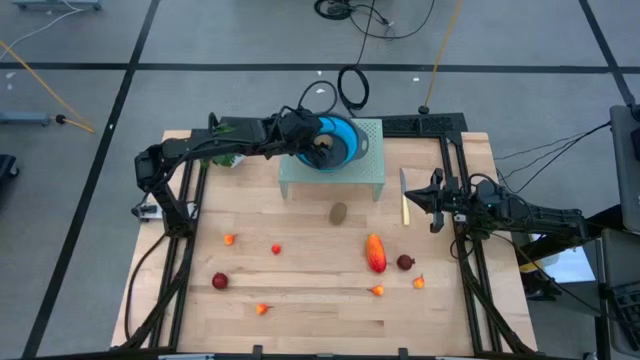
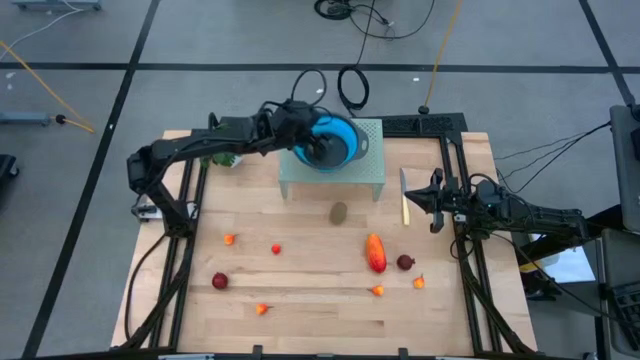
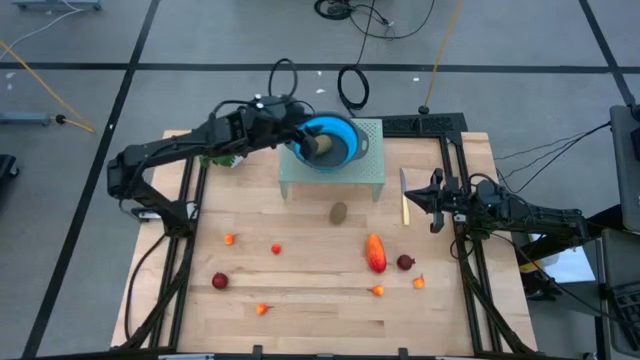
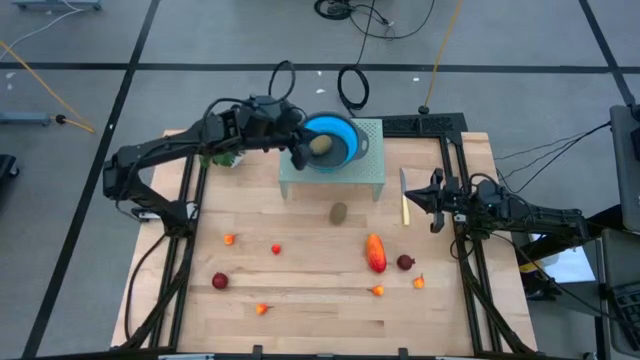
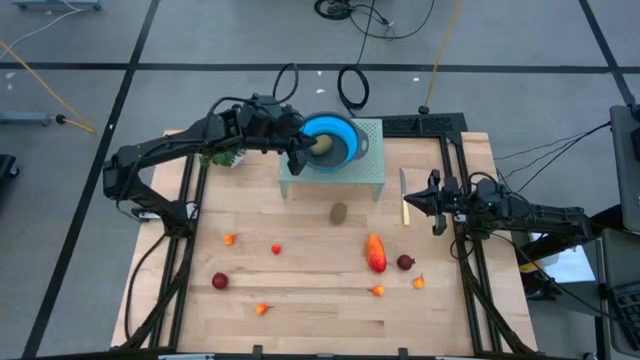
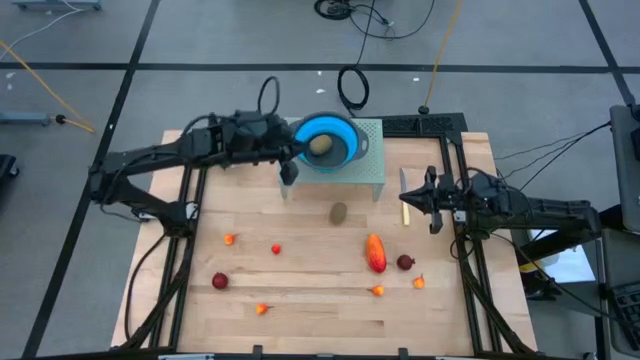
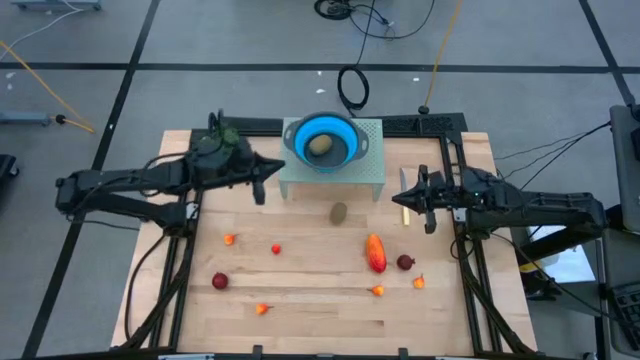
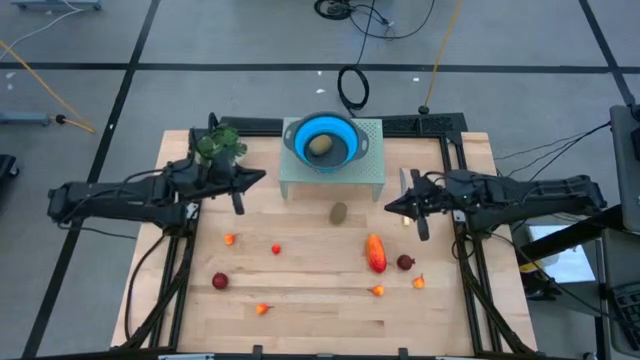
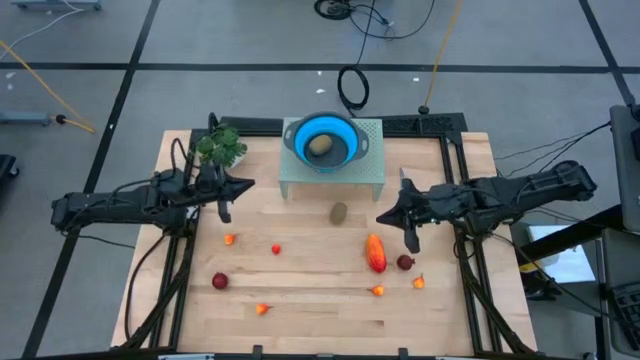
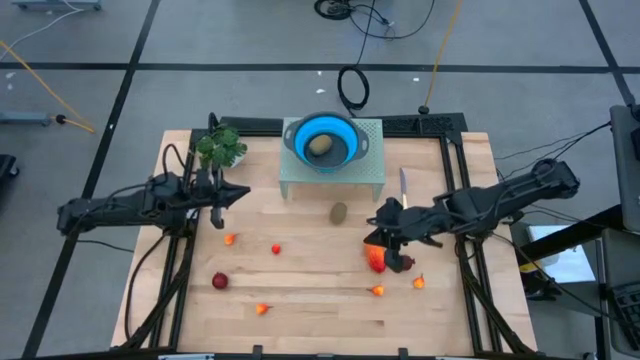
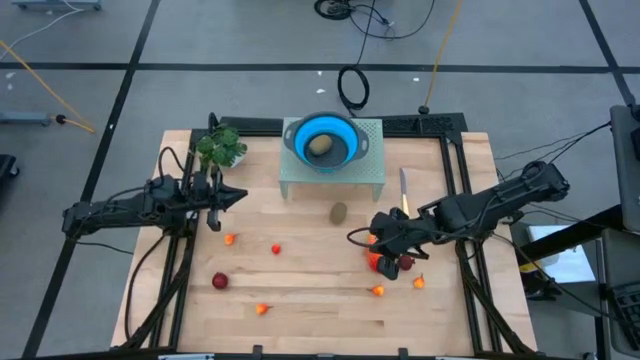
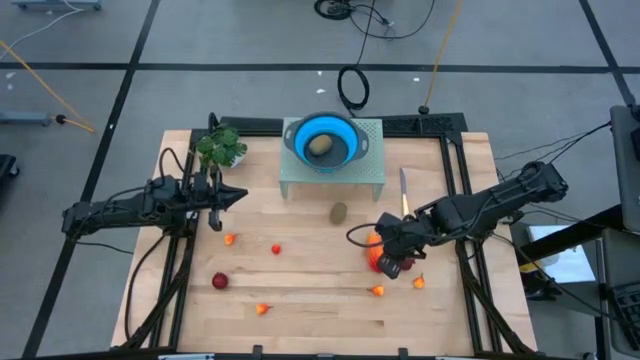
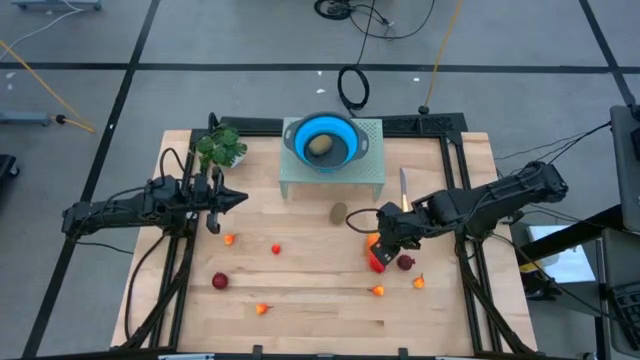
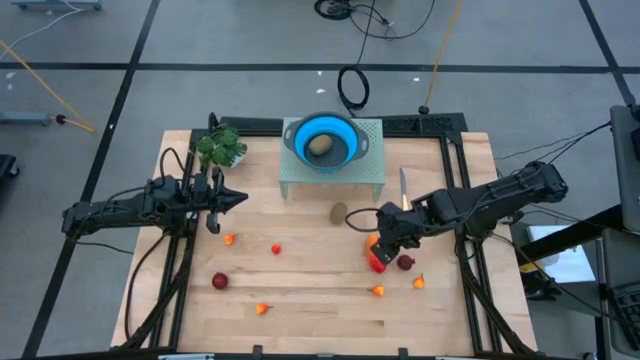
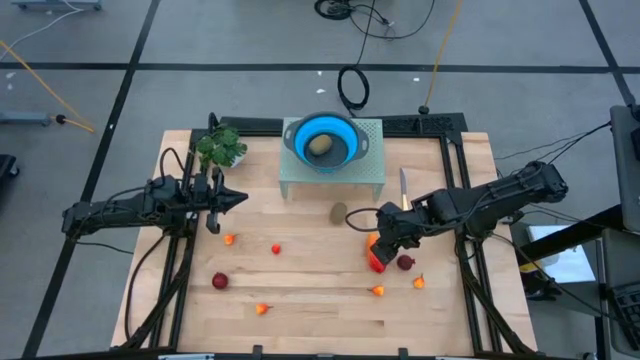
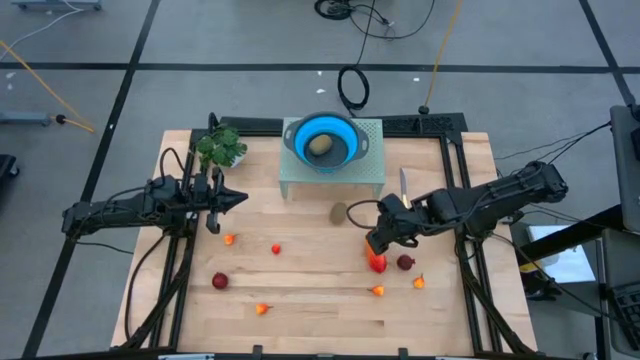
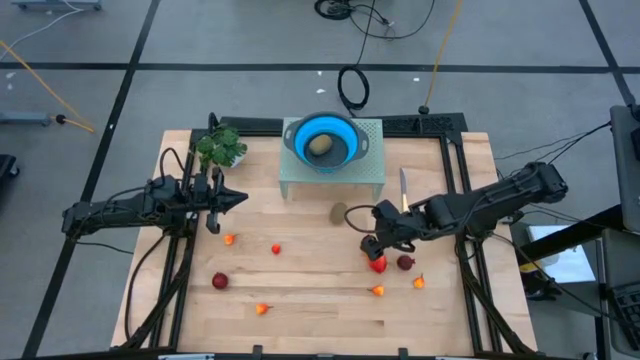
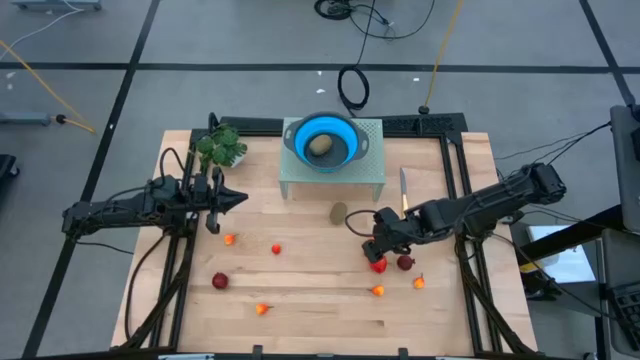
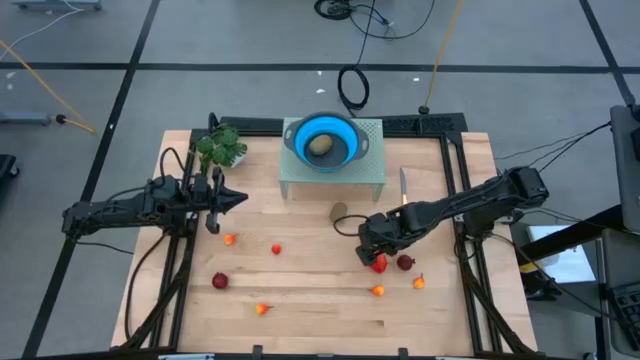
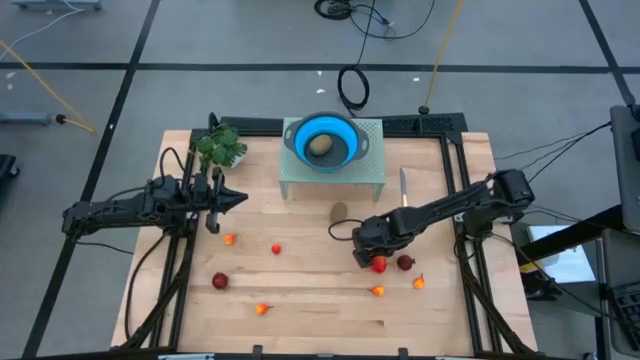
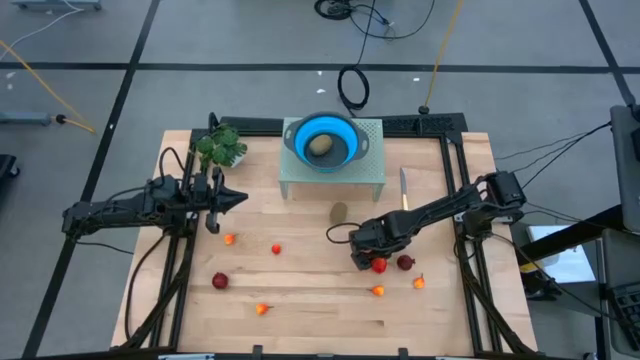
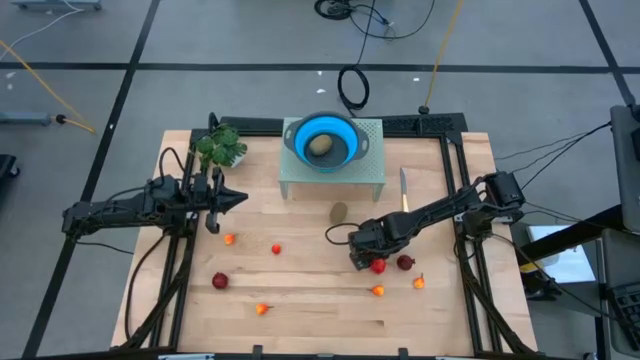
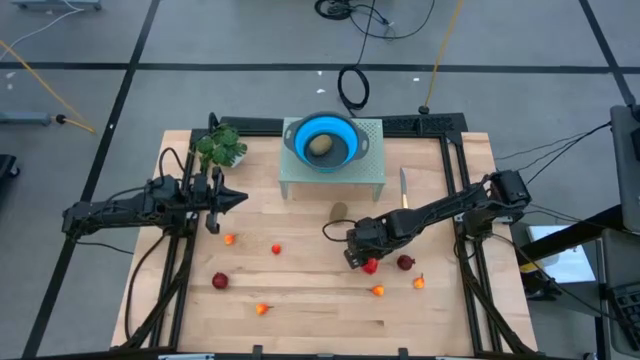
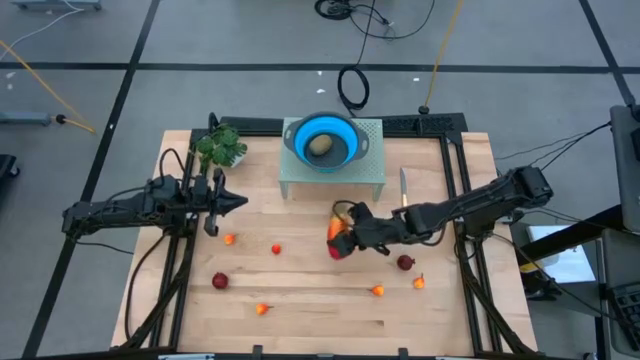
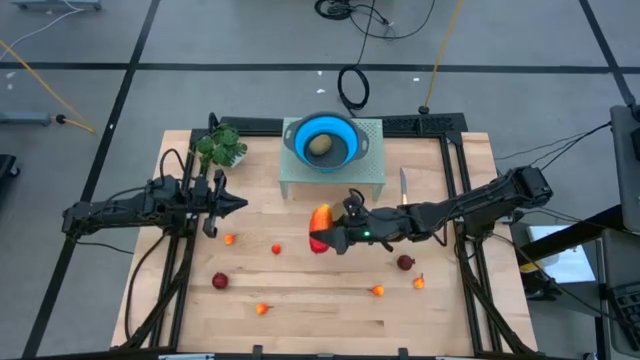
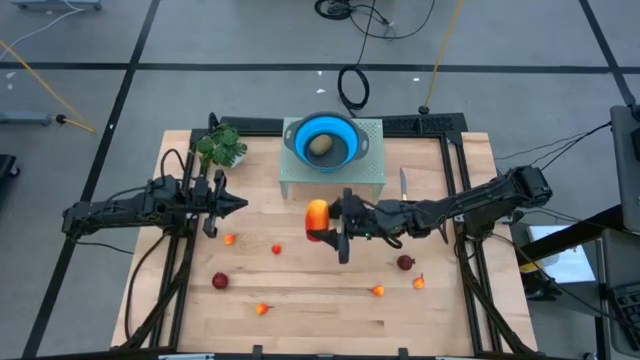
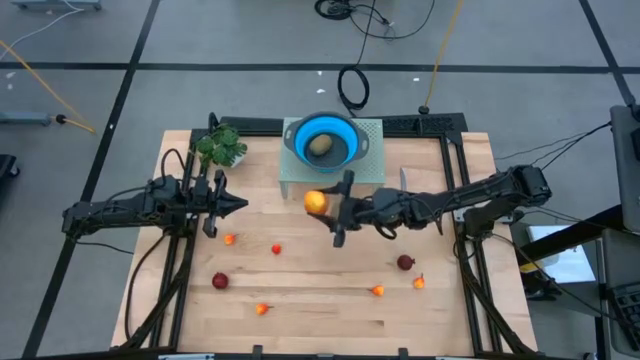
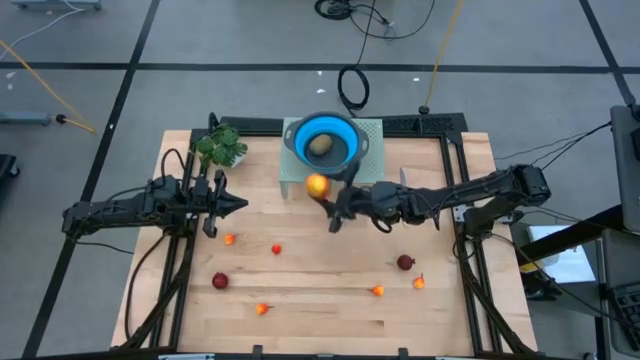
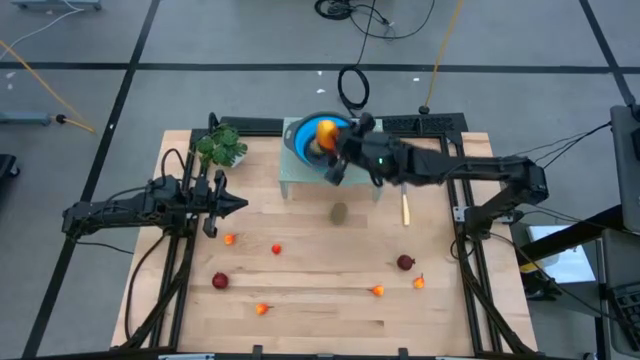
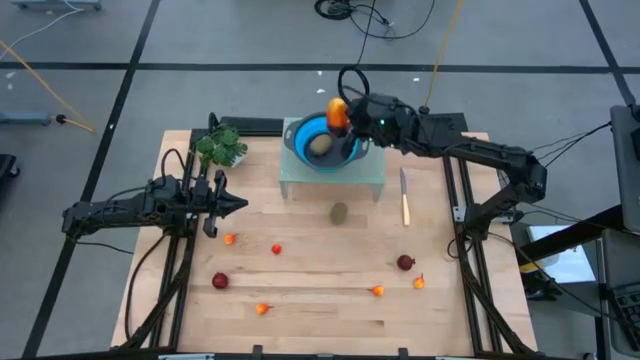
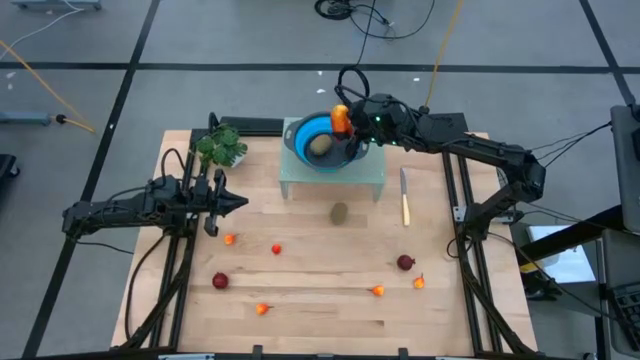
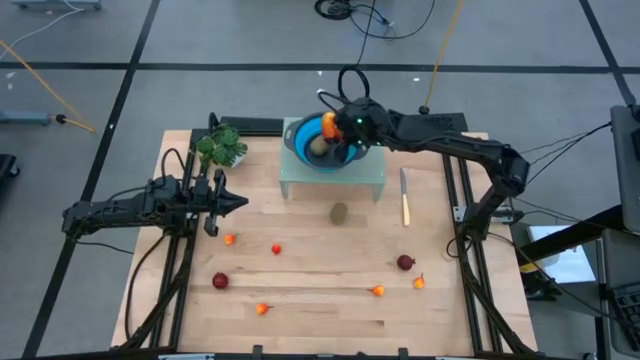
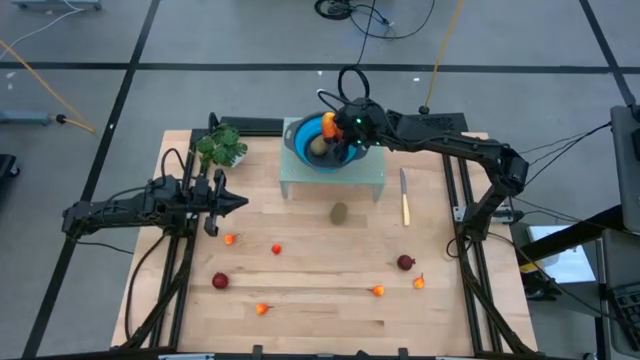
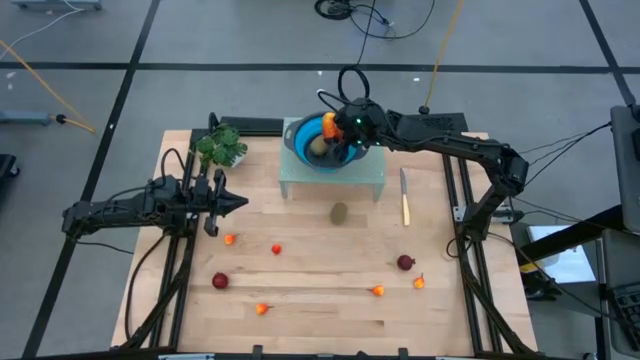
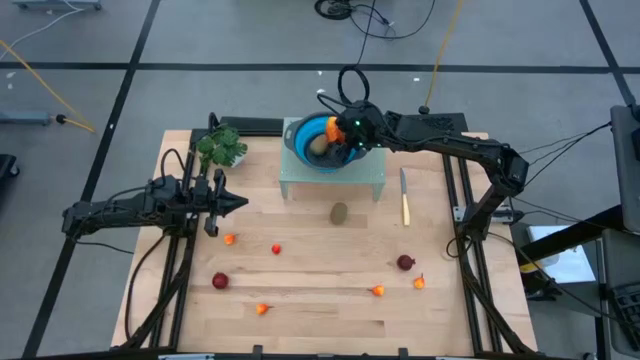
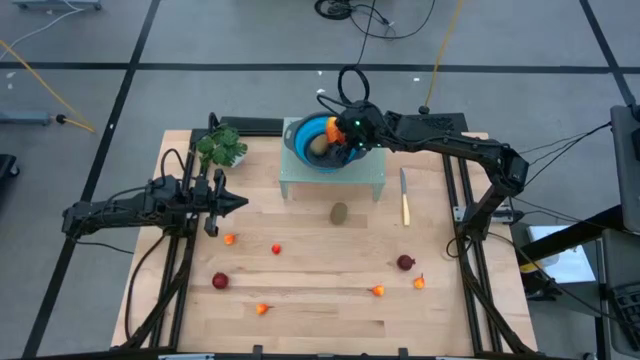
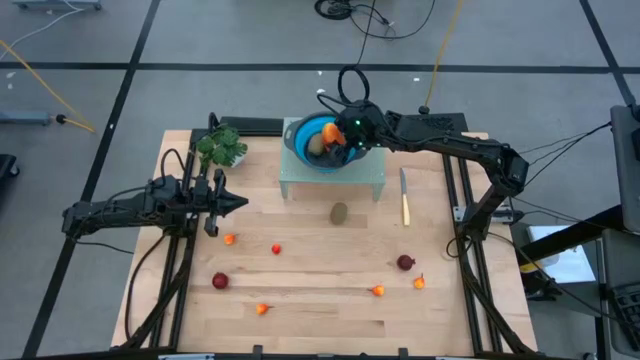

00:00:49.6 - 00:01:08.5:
Task: Pick & Place Fruit
Put the mango into the colander on the shelf

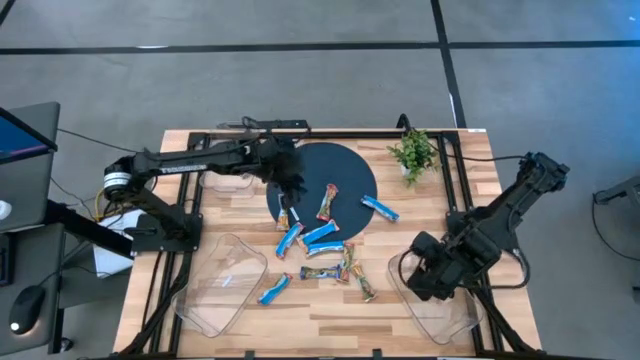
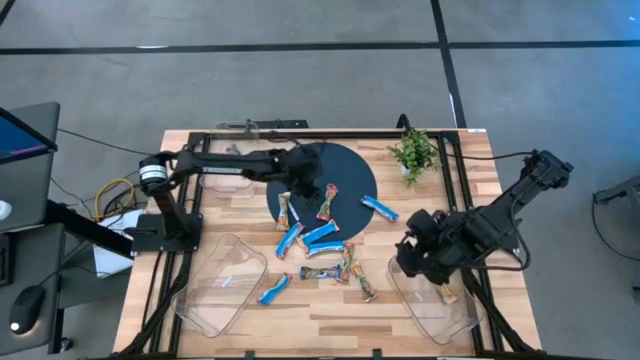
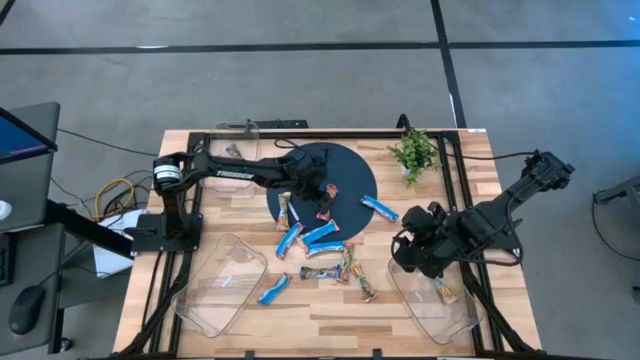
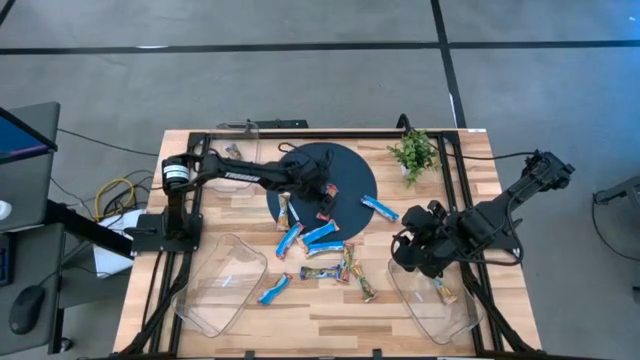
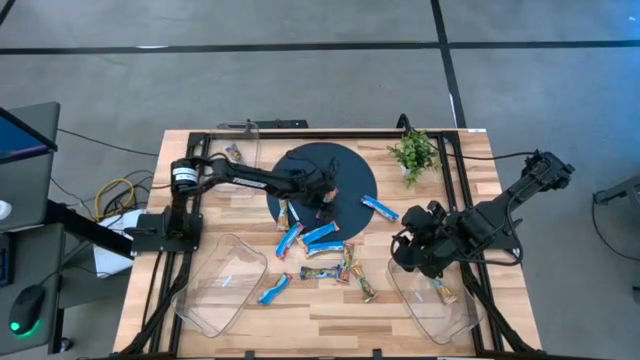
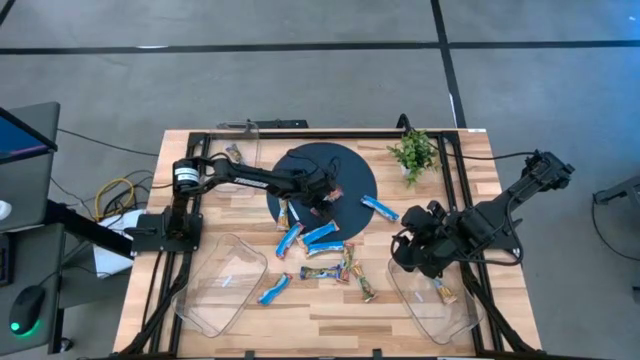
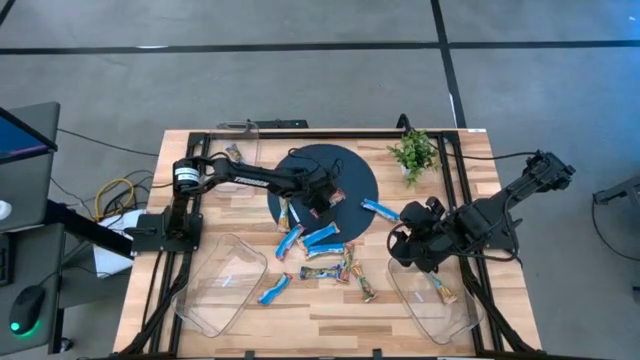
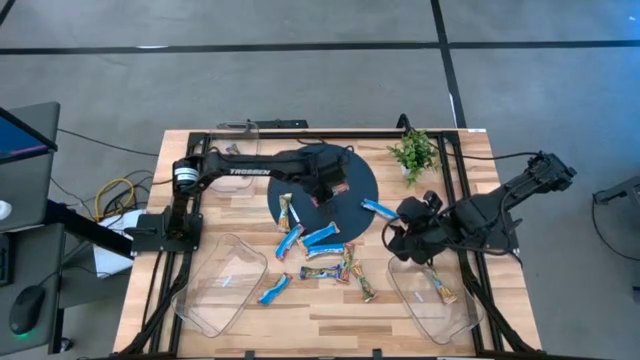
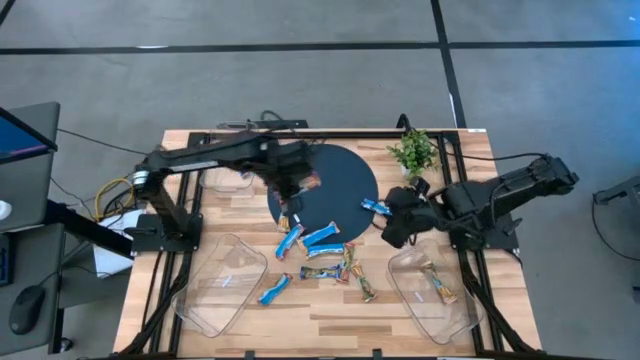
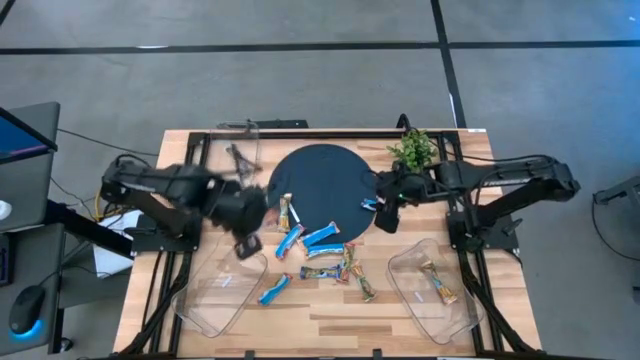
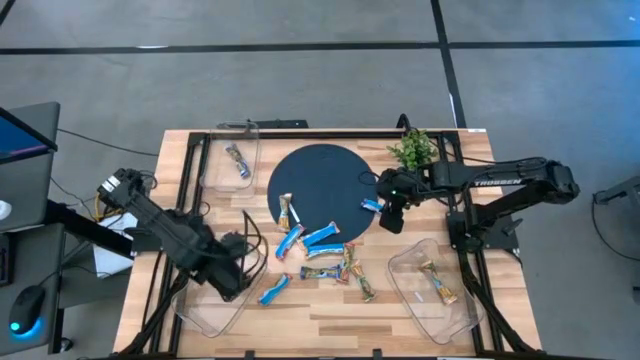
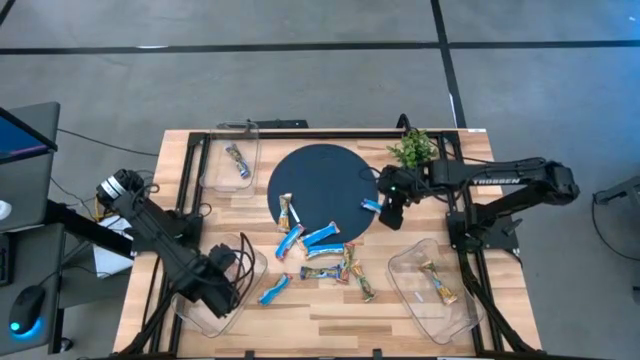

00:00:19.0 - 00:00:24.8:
Task: Pick and place Granola Bars by type
Put the red granola bar into the bottom left transparent bin
